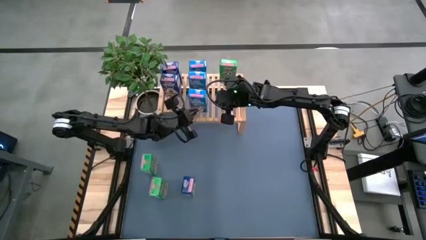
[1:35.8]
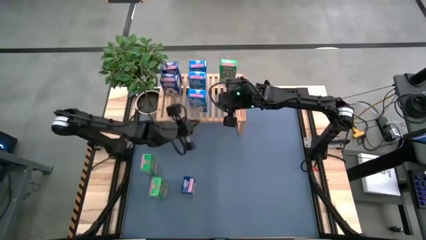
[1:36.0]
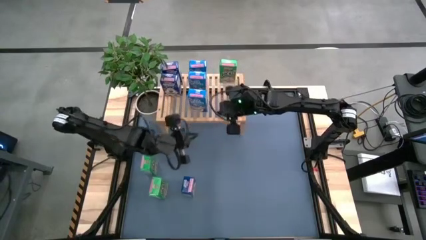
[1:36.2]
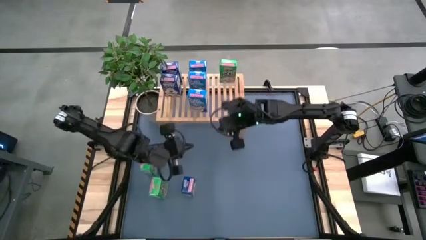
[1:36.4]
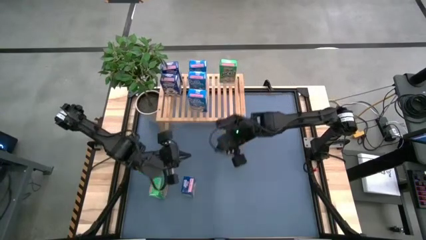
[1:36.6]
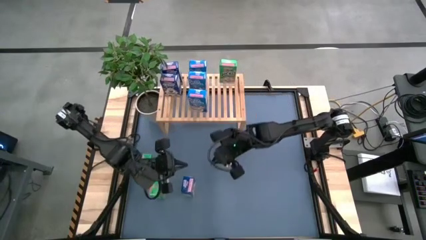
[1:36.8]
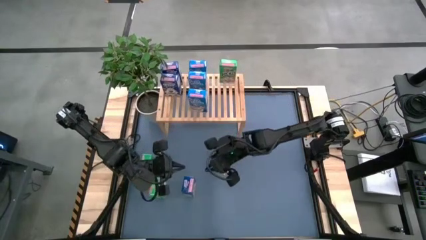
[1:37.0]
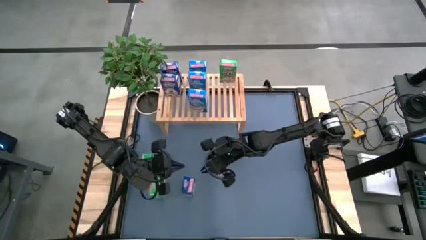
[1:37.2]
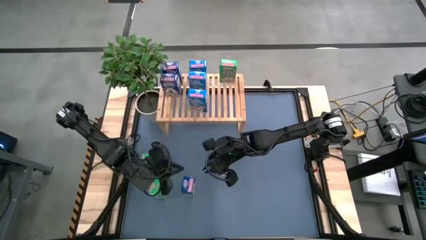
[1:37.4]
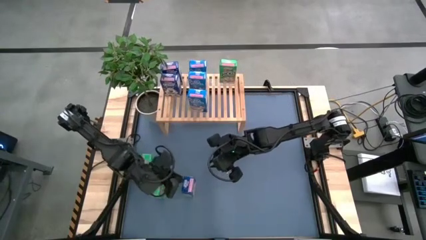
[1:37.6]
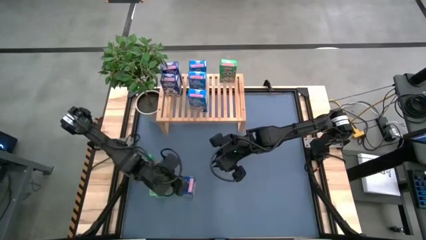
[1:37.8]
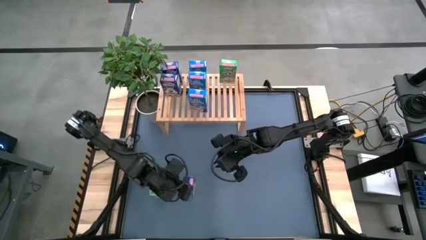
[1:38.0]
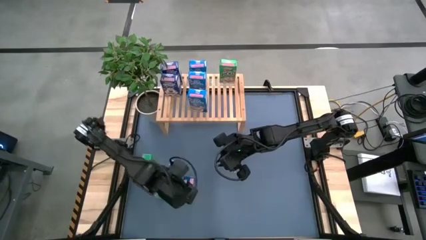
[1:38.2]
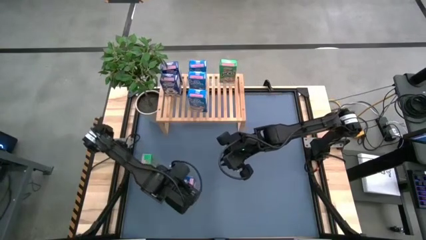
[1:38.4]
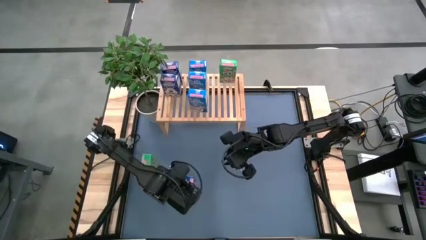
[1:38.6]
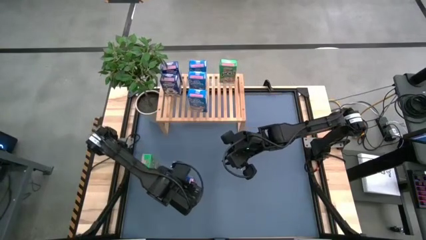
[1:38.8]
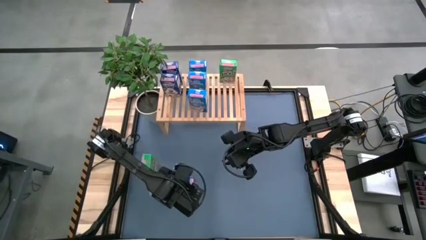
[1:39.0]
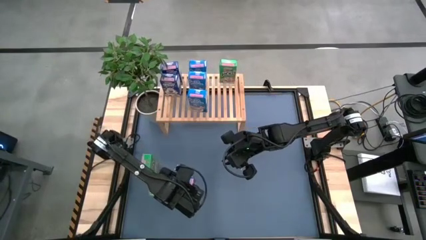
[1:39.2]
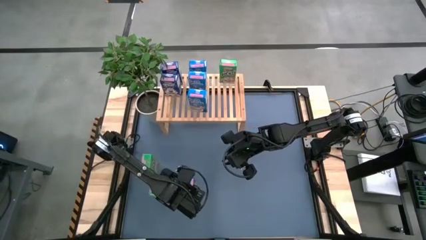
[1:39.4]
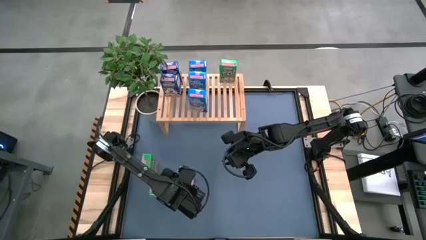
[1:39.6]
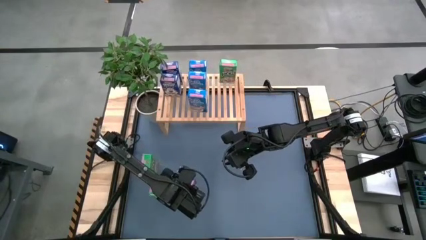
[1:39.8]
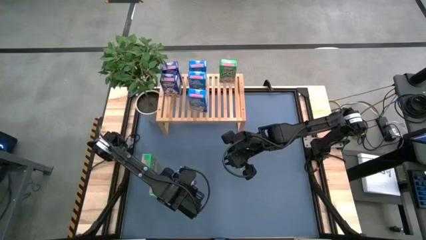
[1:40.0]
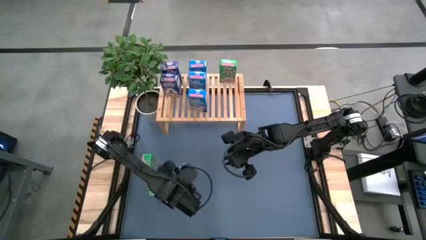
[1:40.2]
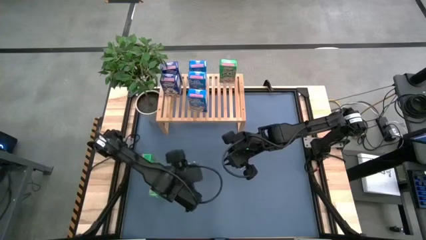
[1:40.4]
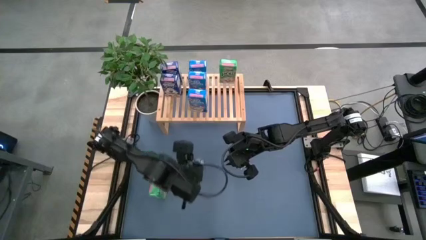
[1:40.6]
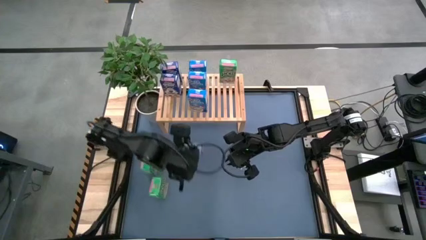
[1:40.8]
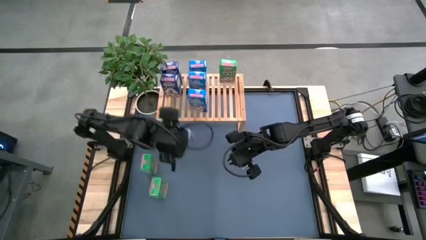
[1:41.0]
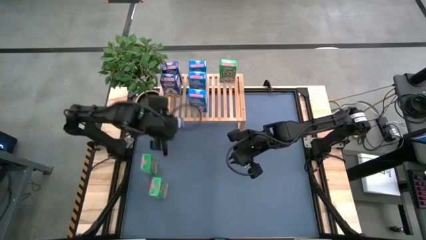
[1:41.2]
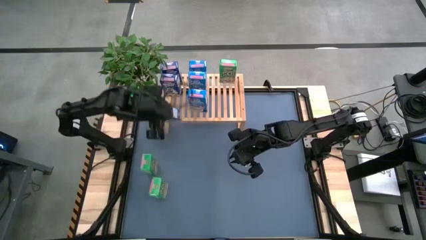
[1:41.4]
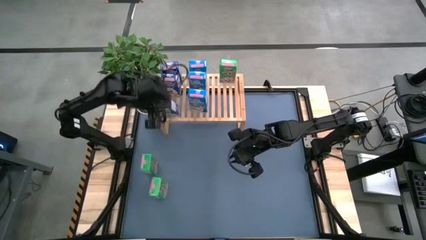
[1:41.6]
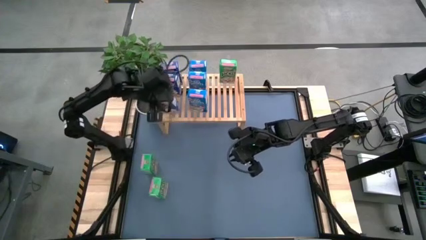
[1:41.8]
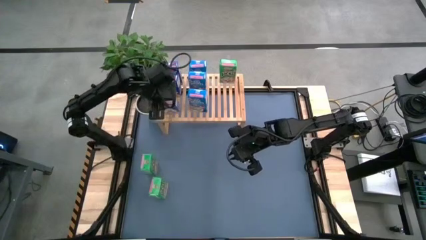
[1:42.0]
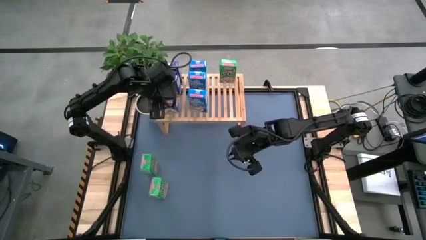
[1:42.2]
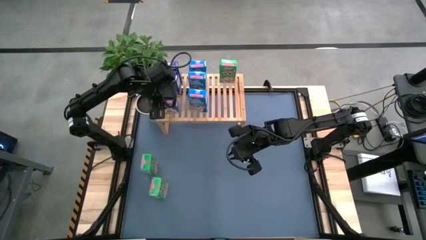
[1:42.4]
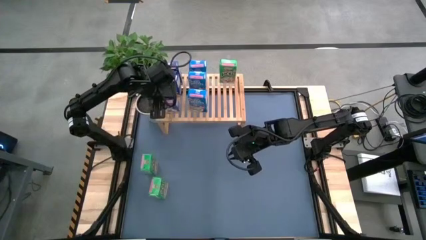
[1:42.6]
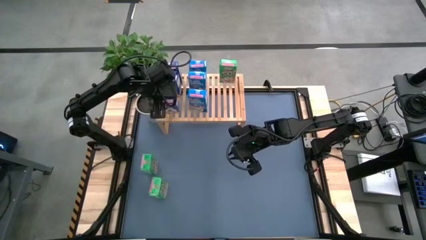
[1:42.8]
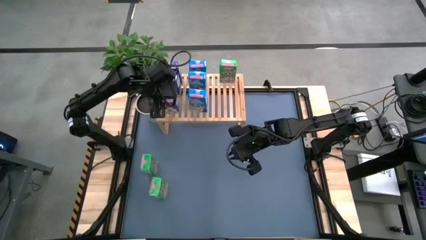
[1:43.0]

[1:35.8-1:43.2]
Task: Stack cereal on shelf
Put the blue cereal box on the shelf aligned with the blue cereal boxes

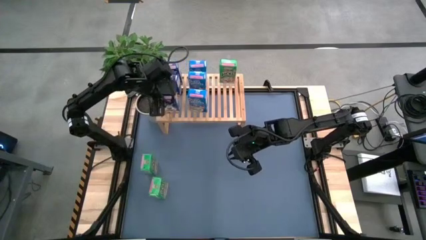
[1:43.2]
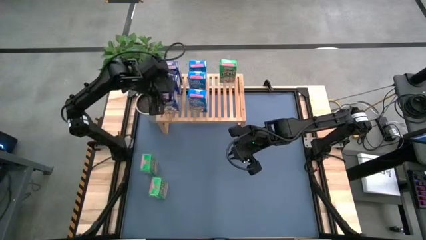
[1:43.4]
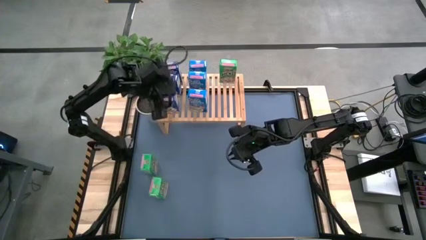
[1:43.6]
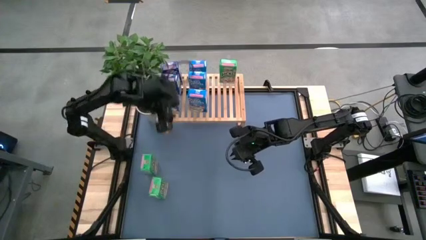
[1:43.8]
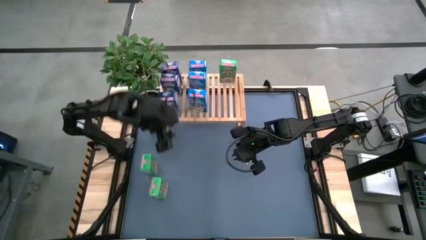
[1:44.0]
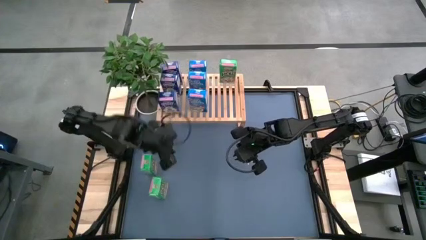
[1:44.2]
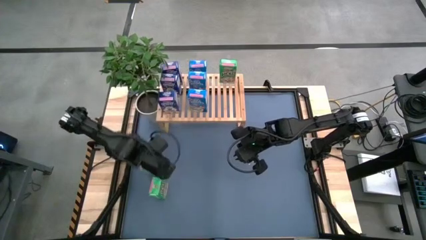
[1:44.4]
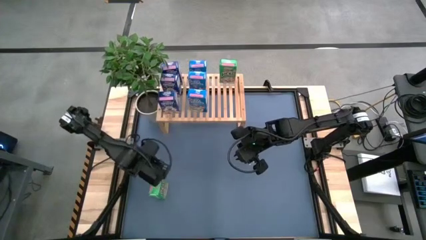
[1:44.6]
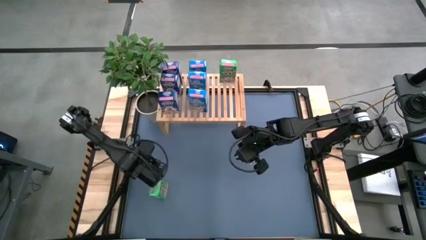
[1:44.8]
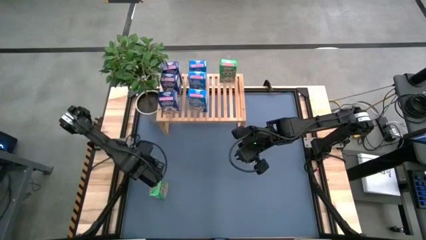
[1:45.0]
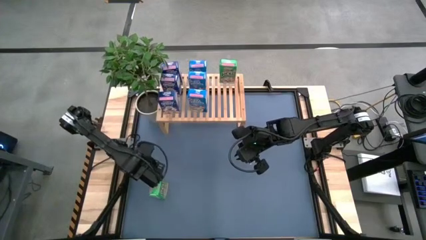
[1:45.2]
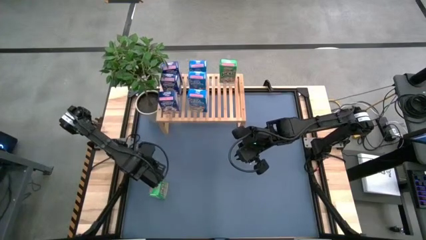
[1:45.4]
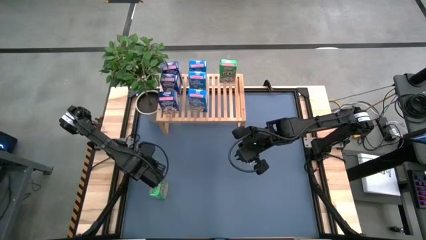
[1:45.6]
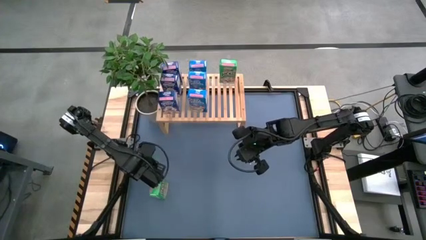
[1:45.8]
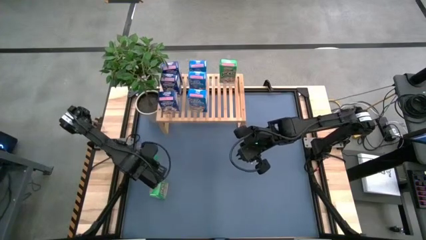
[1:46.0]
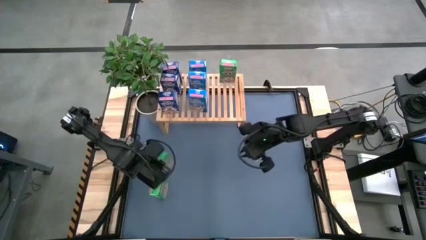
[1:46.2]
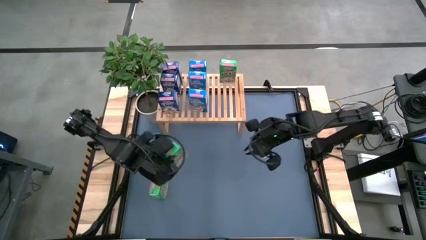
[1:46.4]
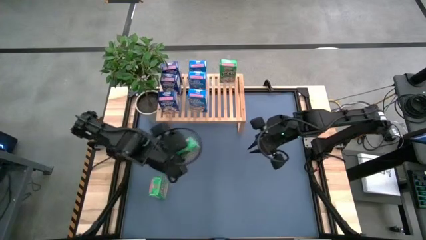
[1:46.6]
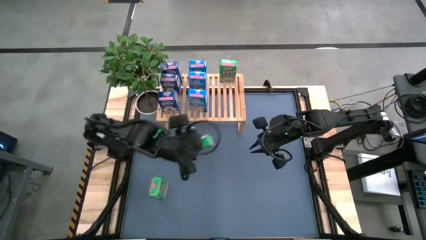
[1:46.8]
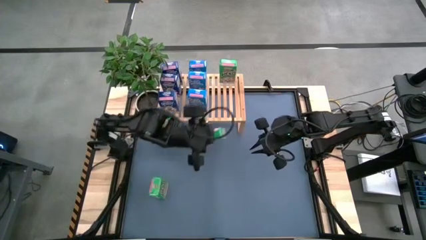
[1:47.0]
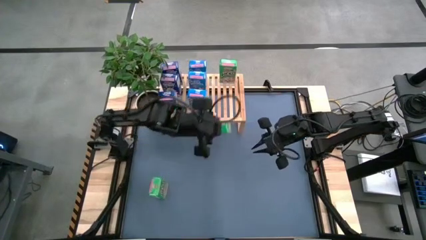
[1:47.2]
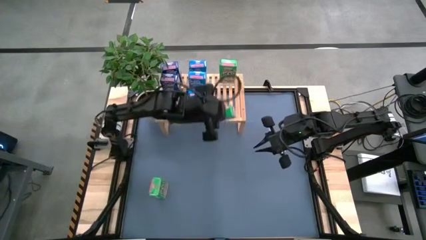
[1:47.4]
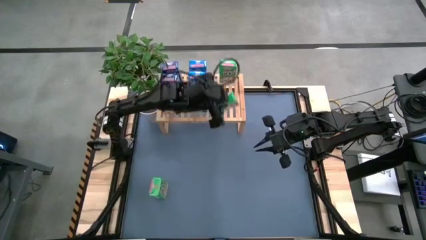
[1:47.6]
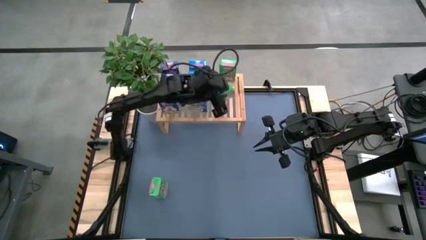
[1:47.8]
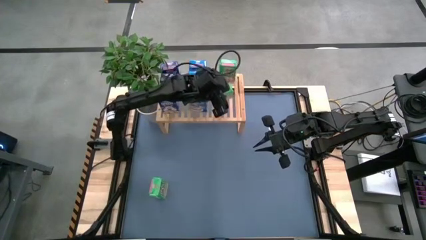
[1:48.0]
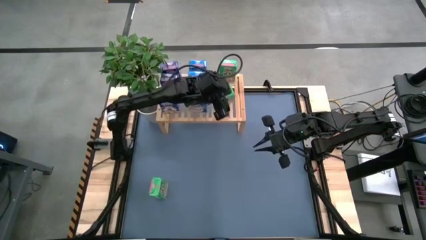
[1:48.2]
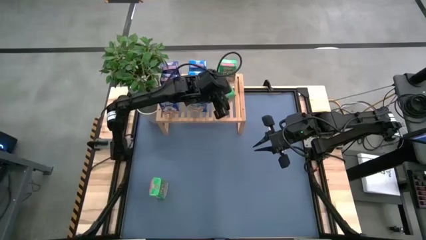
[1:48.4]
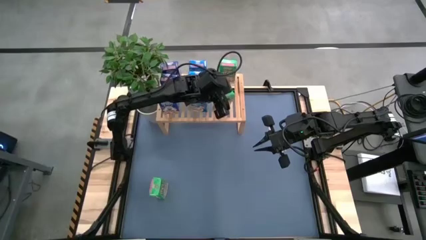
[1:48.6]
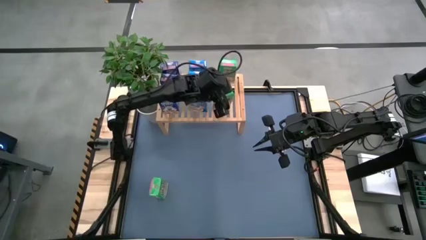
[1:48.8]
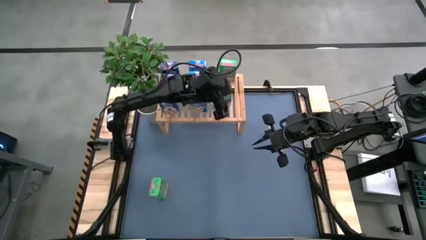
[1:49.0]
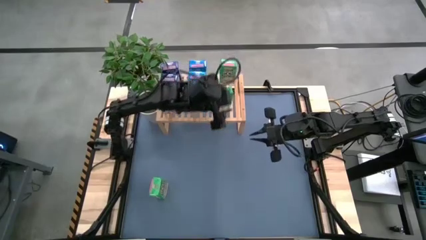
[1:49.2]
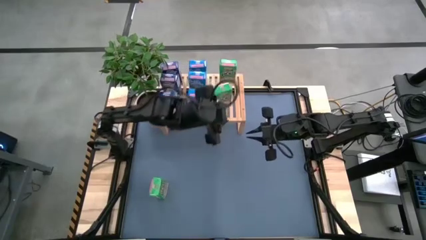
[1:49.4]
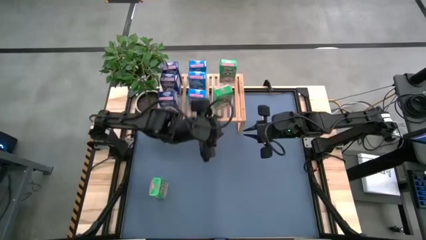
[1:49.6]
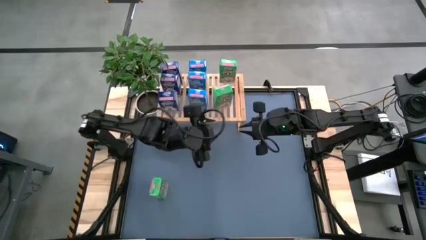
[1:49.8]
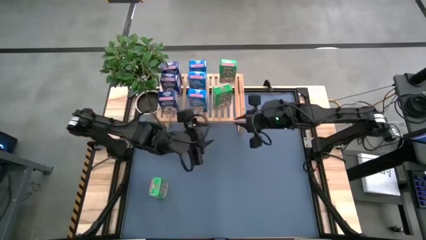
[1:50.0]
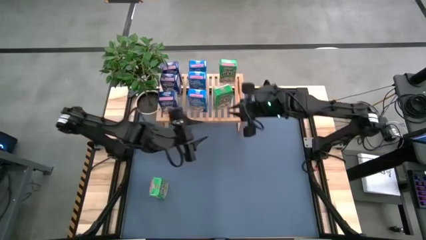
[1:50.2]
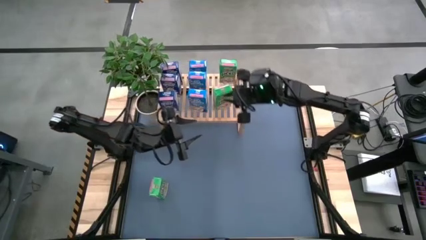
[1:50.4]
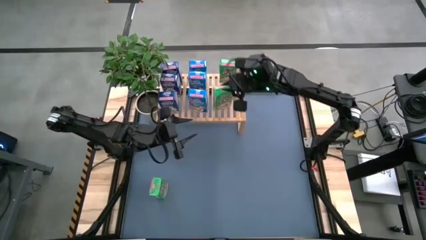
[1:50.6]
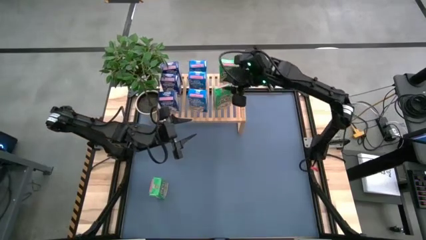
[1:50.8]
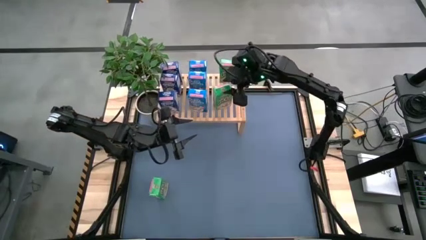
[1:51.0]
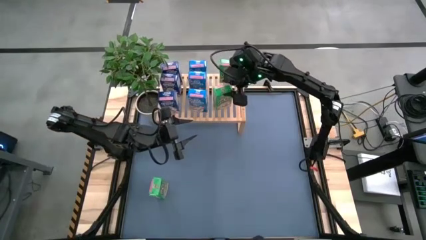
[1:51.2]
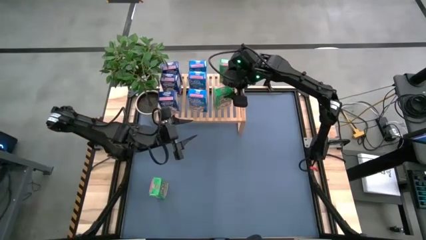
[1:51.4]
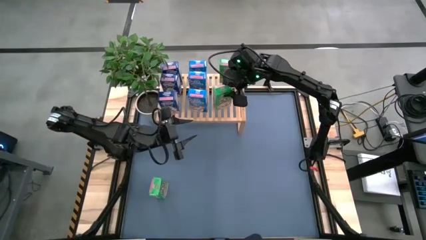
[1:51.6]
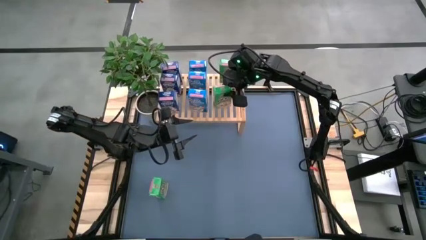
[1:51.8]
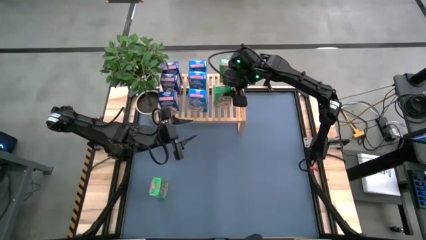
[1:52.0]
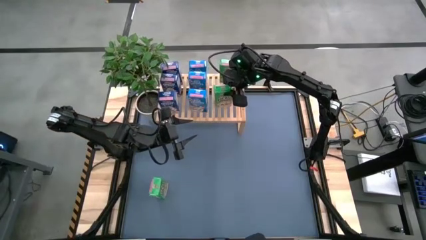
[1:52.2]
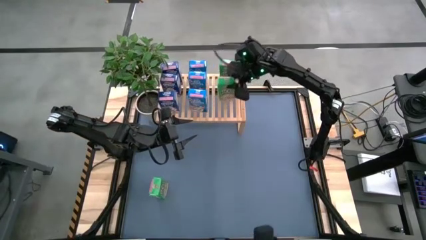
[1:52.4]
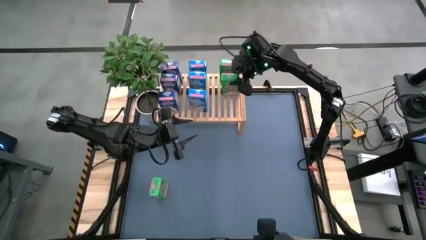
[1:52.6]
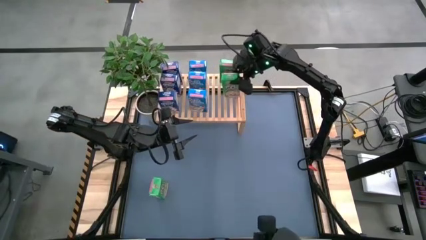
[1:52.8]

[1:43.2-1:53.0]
Put the top green cereal box on the shelf aligned with the green cereal box
